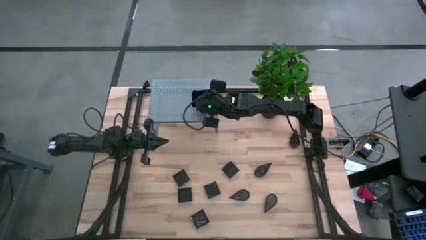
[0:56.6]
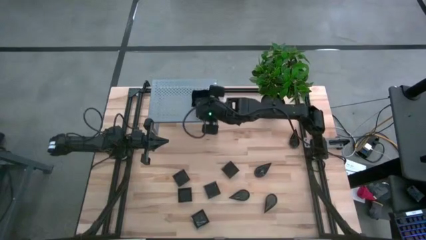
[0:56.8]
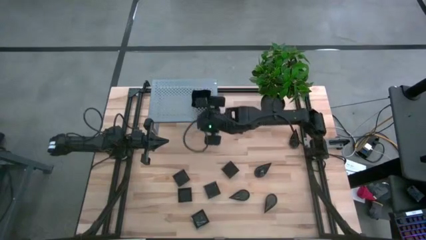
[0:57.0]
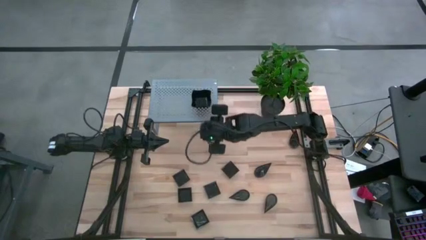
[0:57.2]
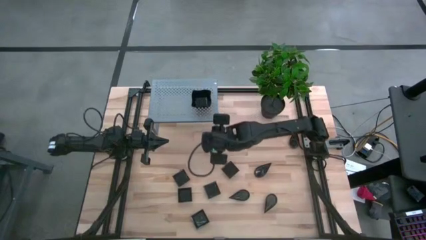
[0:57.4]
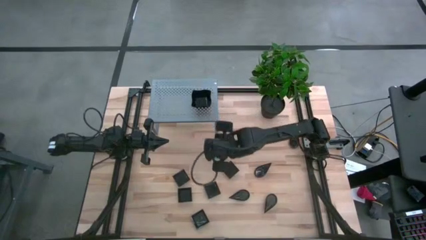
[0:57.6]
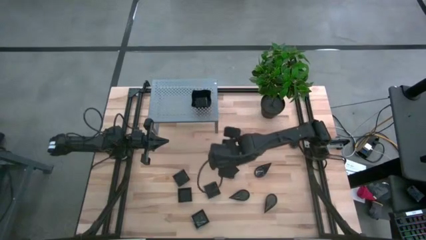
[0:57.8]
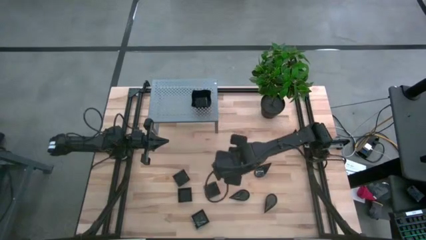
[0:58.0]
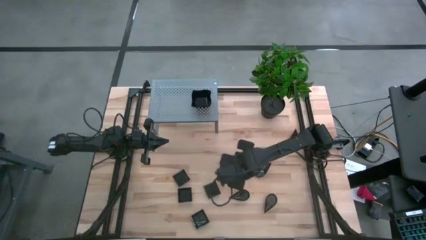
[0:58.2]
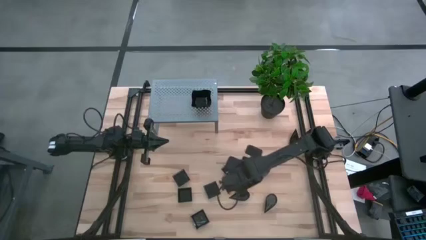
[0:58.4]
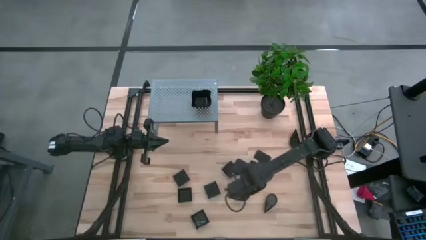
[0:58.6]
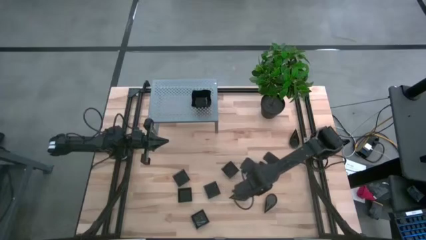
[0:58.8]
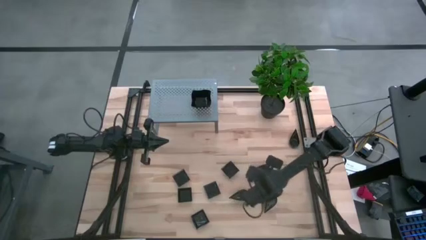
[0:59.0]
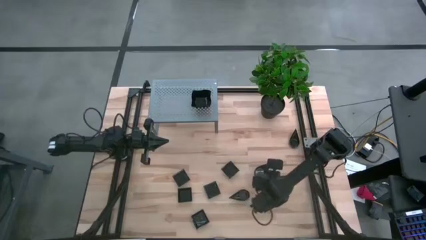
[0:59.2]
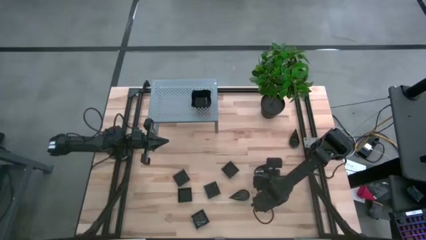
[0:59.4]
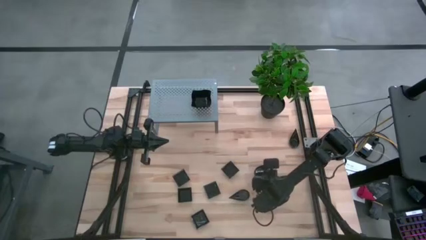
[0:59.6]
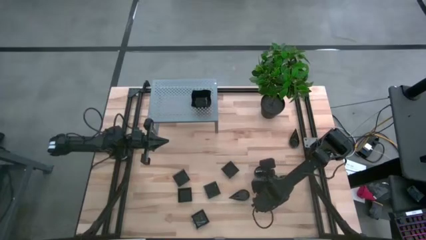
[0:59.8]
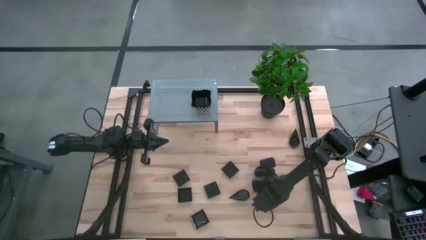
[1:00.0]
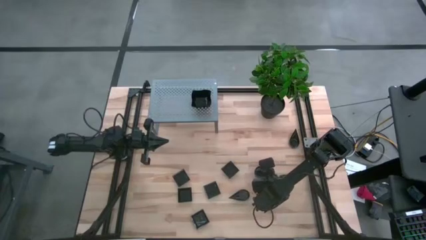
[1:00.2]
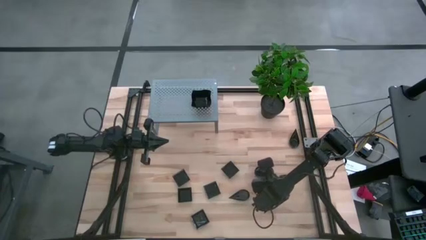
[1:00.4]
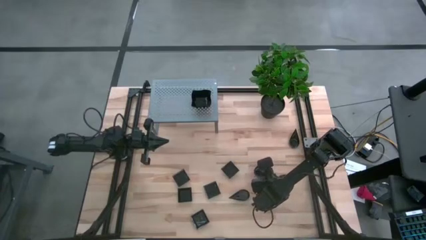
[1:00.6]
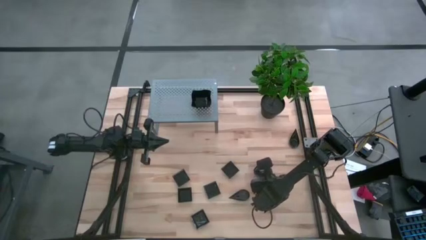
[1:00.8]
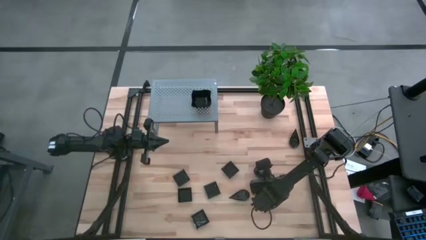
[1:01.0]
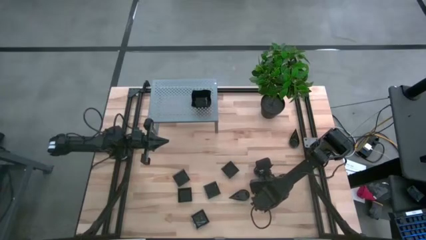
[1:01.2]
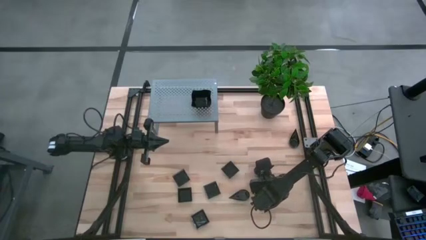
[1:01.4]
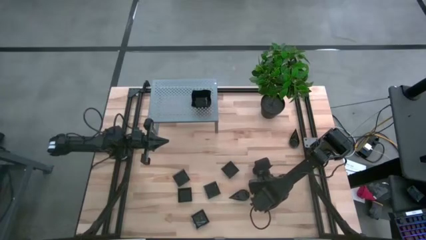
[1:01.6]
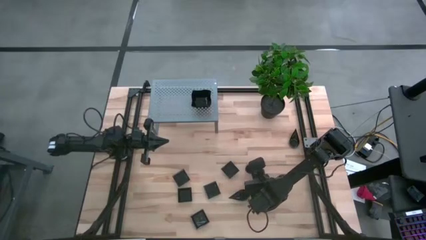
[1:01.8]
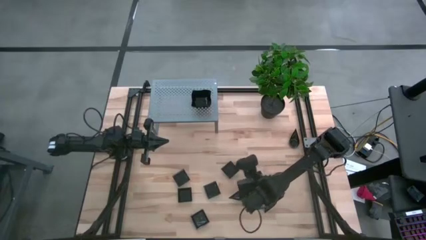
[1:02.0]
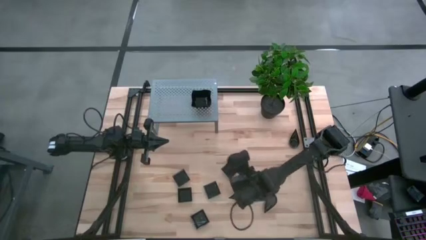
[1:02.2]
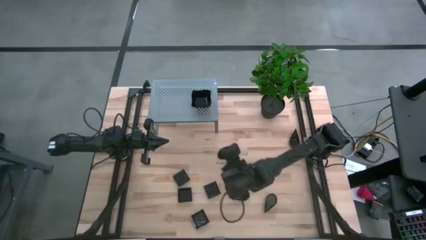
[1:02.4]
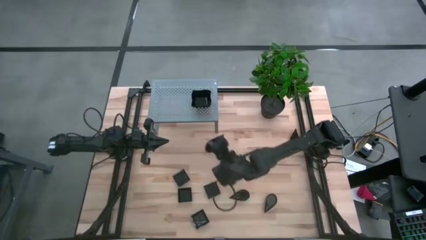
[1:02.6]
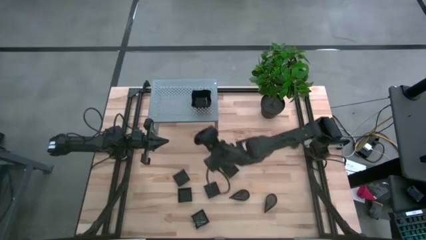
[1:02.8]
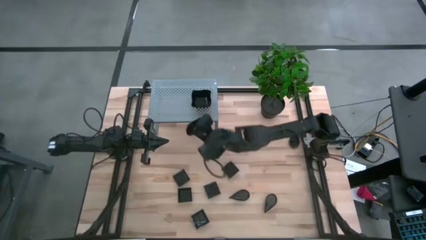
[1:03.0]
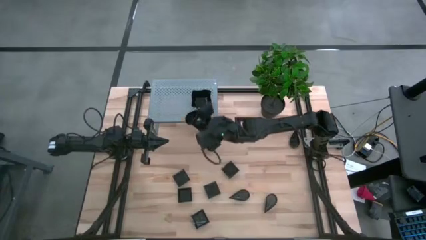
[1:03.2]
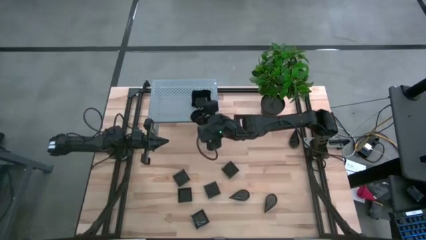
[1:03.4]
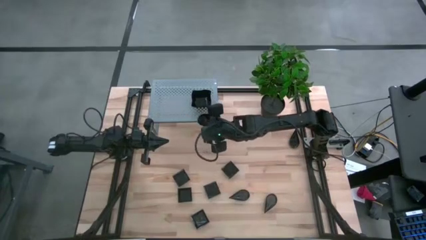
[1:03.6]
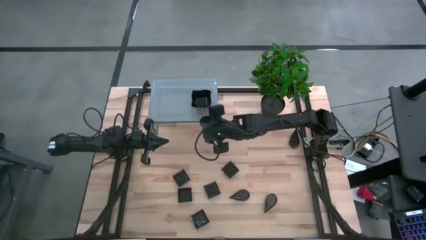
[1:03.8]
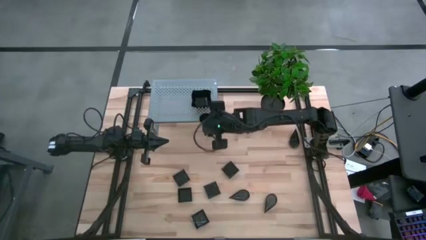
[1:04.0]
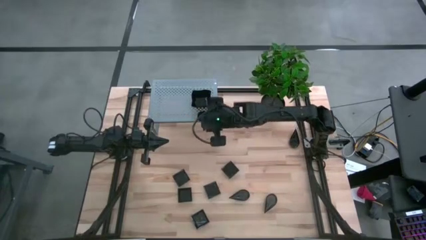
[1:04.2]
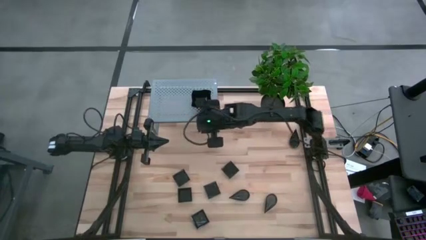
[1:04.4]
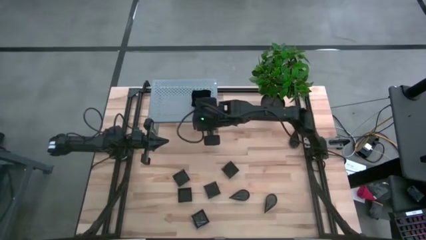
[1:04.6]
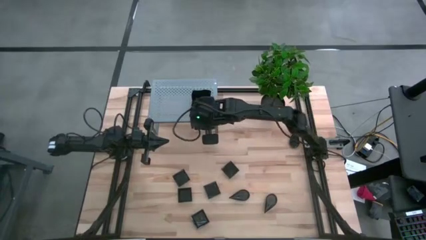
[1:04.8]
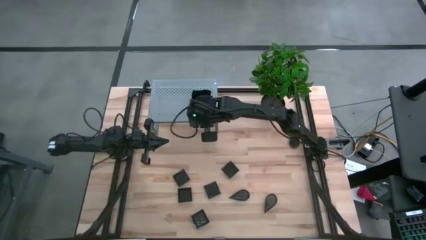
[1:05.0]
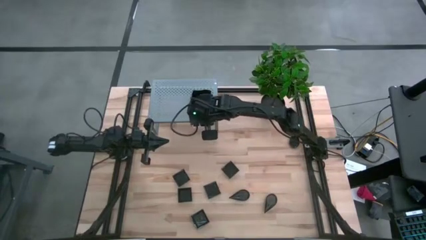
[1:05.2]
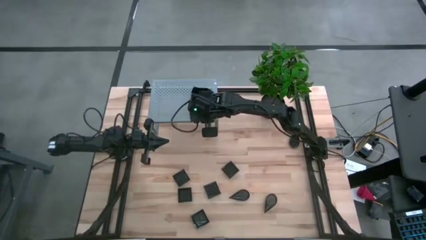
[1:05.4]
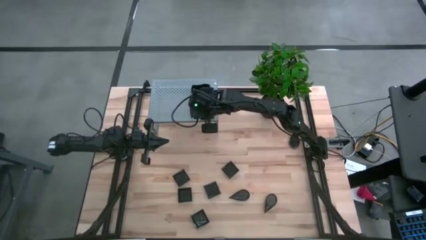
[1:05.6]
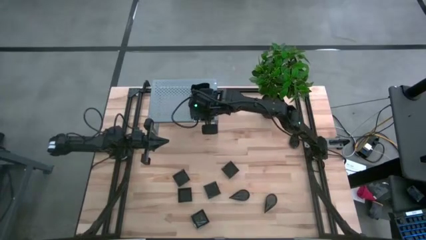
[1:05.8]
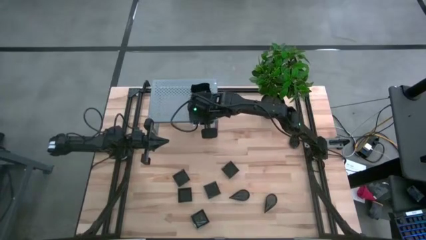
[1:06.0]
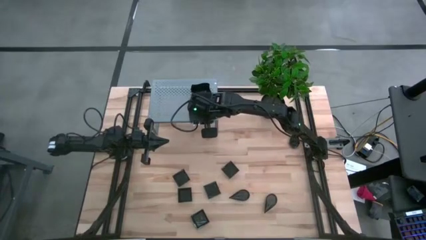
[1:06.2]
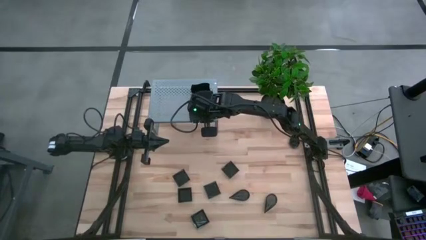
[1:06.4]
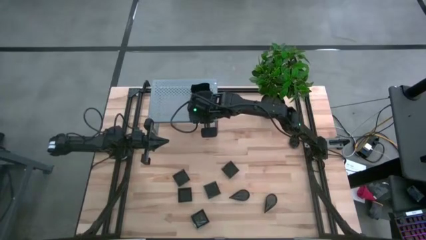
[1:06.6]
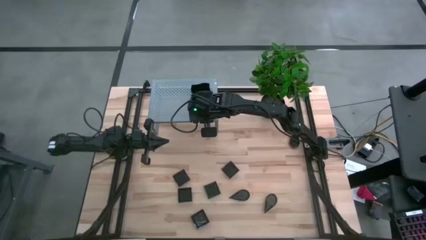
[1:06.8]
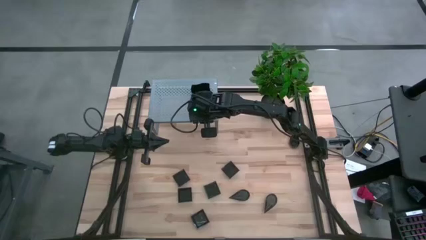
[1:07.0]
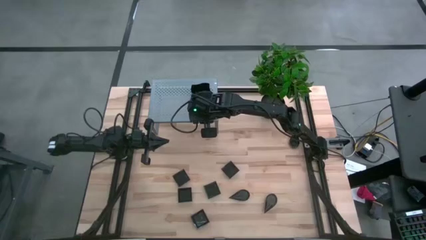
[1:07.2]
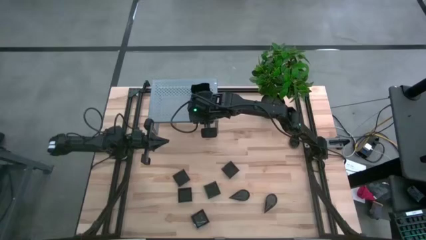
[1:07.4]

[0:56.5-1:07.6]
Task: Pick & Place Mini shaped plates
Put the drop-shaped plate on the shelf

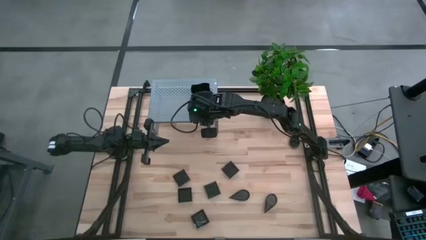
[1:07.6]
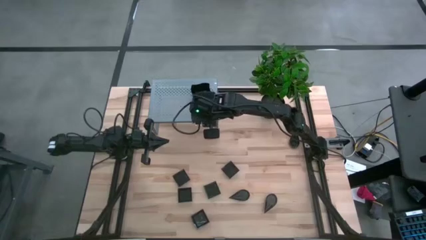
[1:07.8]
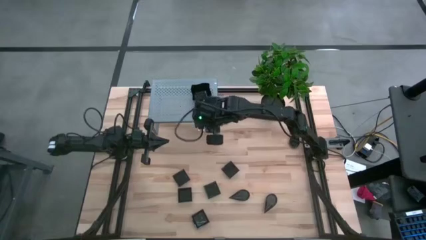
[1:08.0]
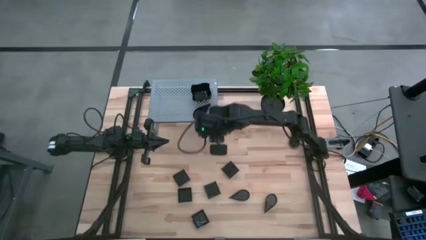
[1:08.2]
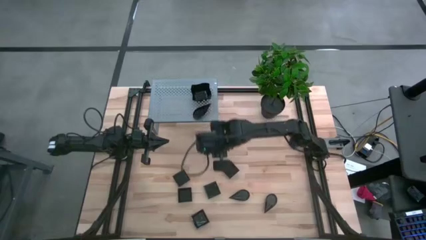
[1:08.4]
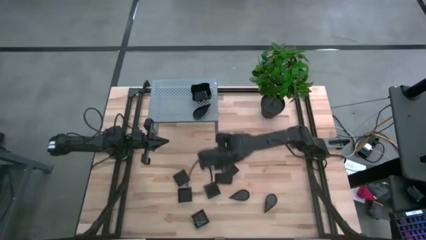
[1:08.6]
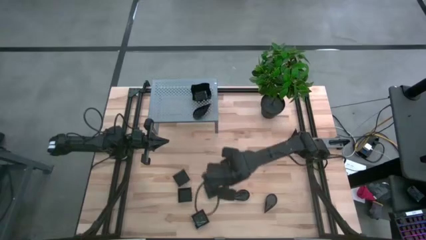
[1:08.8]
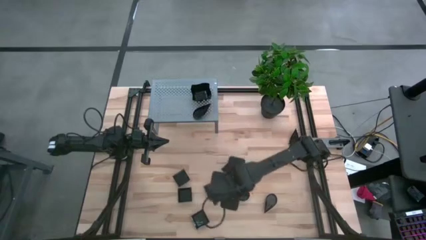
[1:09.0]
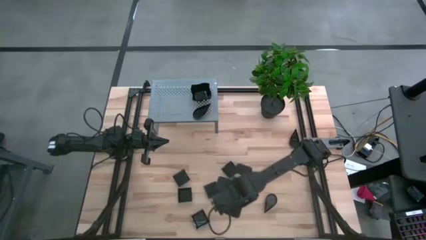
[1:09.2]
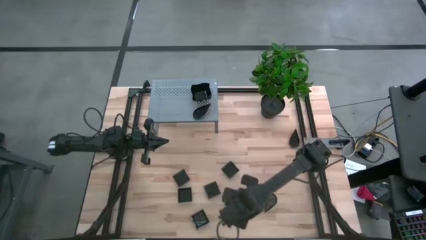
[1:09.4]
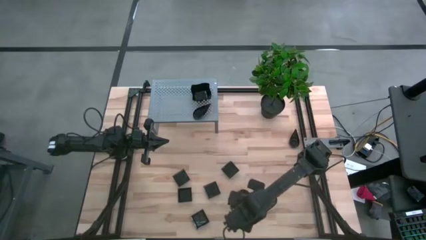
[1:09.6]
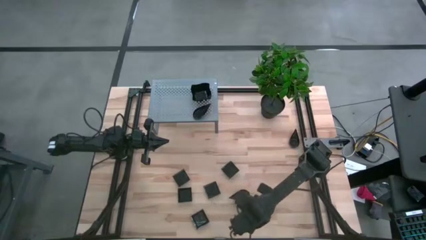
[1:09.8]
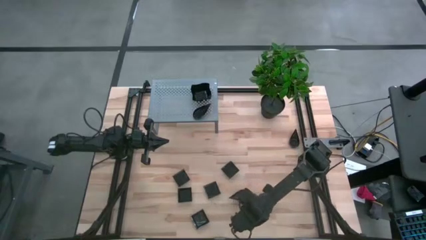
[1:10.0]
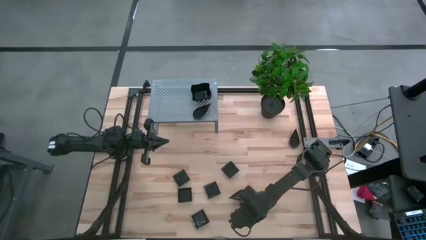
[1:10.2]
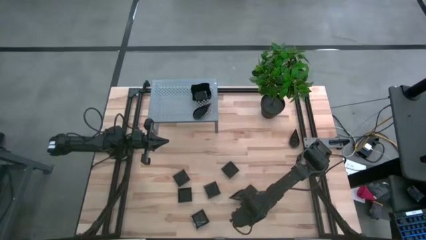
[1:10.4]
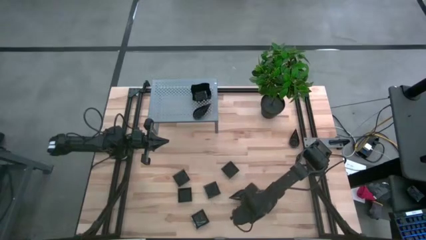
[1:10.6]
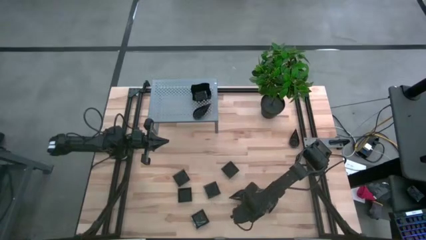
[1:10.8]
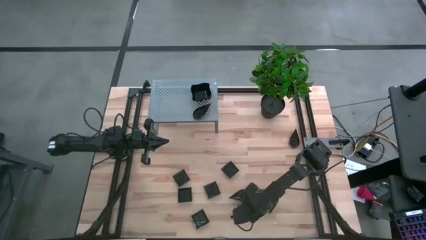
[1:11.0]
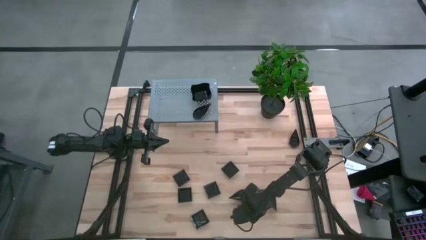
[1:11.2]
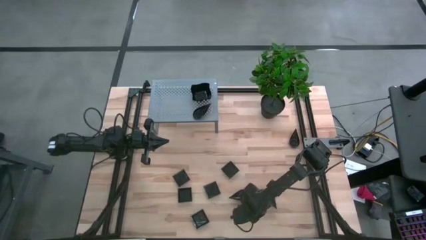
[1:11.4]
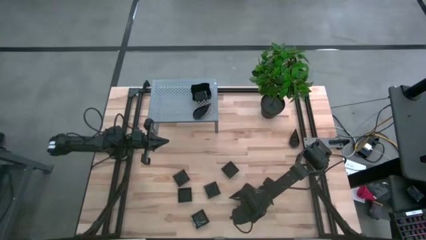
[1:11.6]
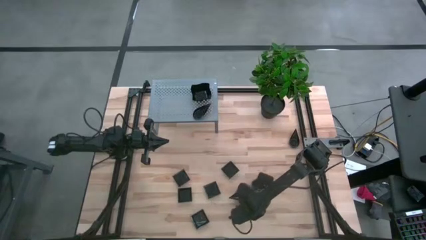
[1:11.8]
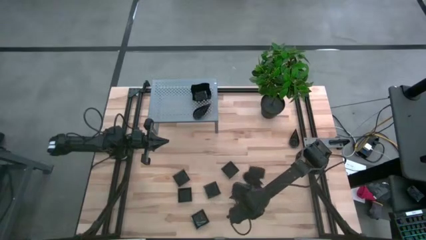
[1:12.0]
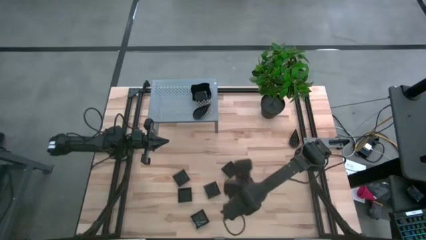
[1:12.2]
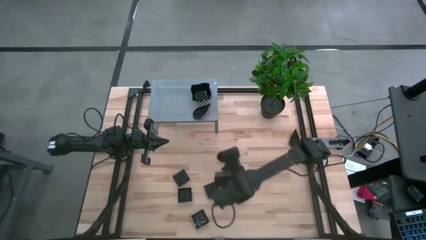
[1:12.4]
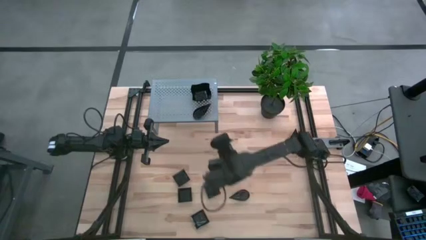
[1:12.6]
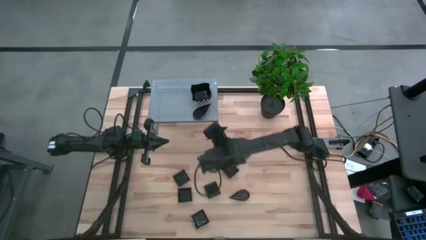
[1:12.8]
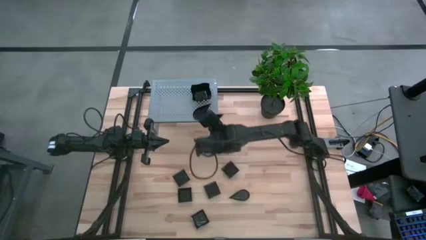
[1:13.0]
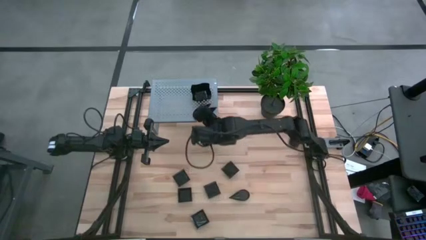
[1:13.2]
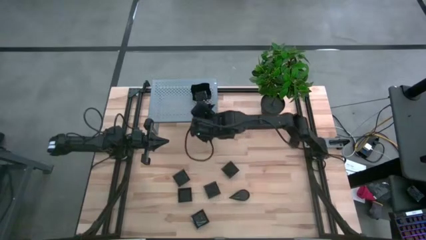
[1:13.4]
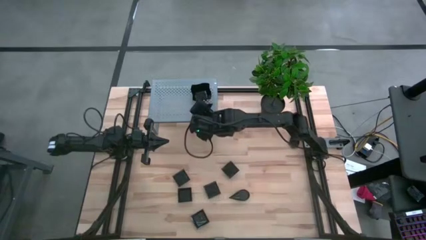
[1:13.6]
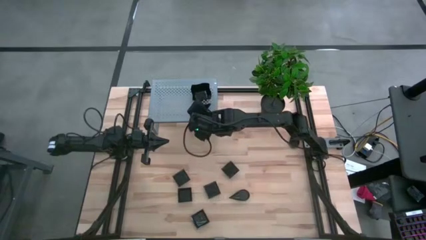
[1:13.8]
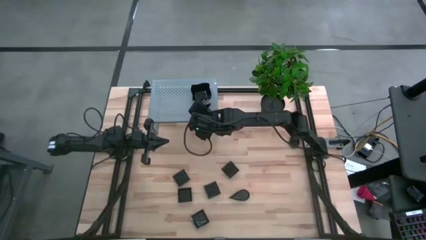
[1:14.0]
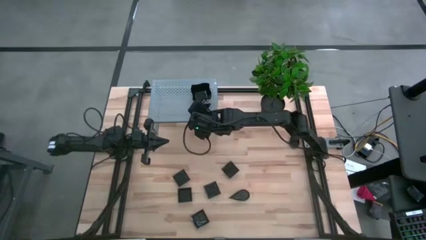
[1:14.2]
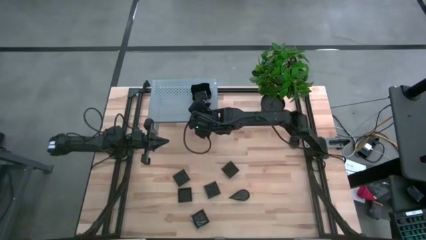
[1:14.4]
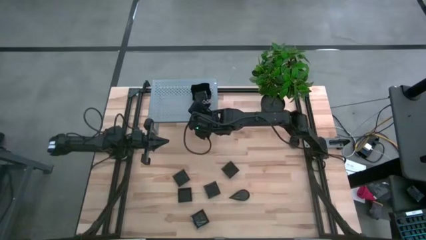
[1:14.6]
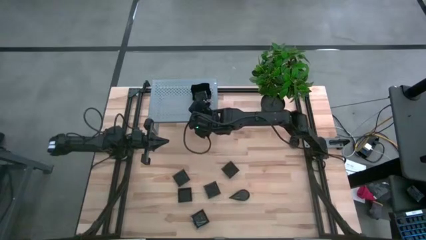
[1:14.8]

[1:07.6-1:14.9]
Stack the drop-shaped plate on top of the drop-shaped plate on the shelf
